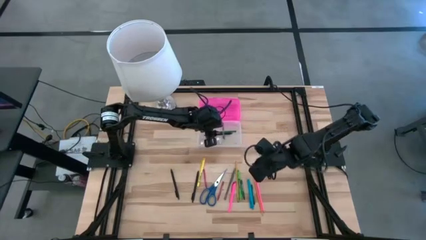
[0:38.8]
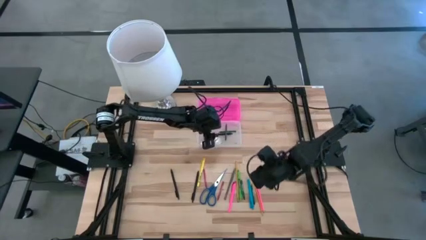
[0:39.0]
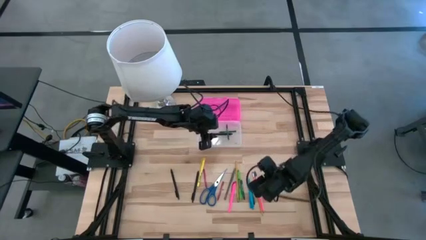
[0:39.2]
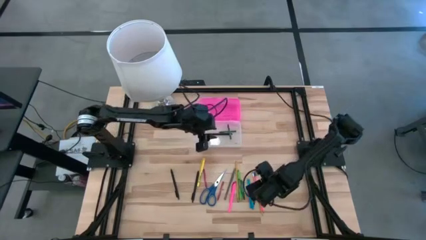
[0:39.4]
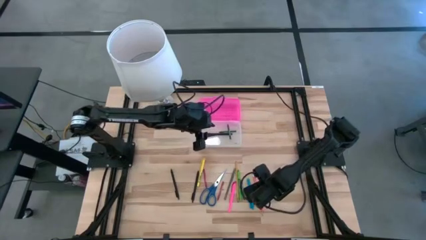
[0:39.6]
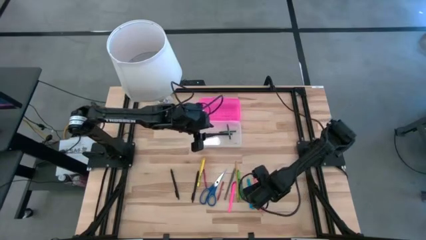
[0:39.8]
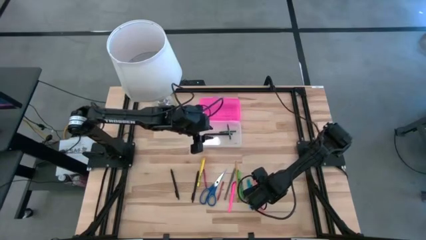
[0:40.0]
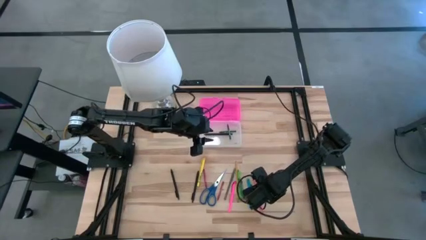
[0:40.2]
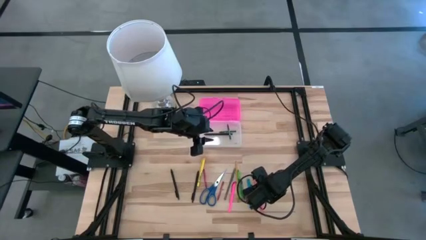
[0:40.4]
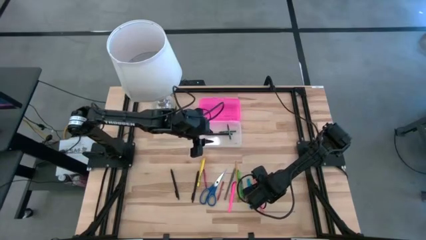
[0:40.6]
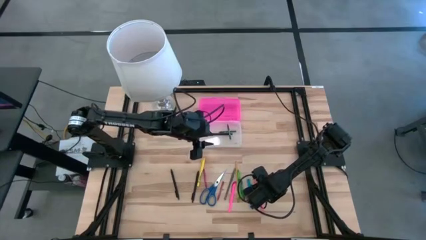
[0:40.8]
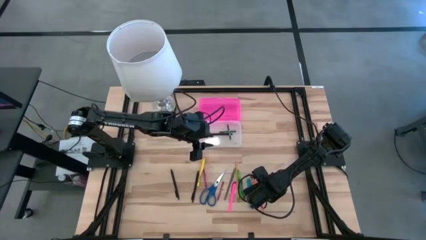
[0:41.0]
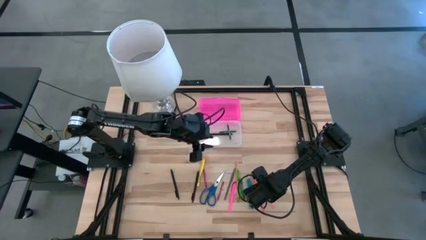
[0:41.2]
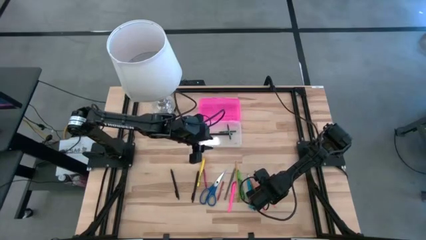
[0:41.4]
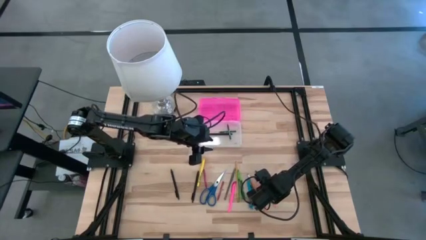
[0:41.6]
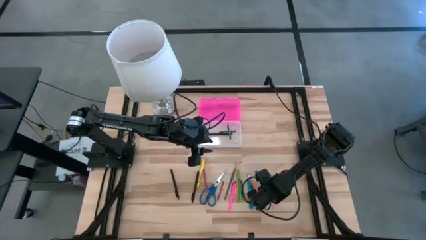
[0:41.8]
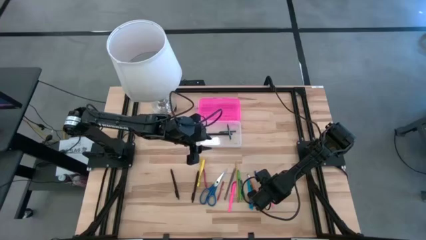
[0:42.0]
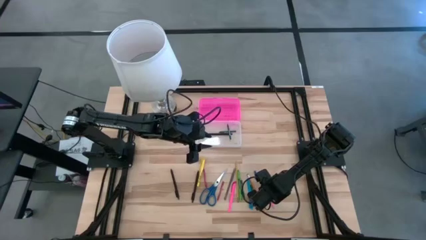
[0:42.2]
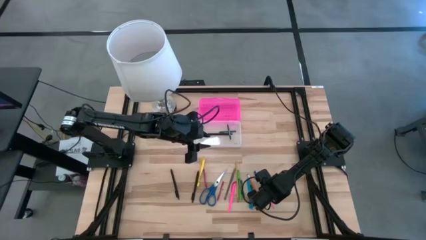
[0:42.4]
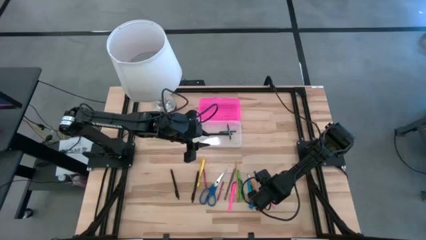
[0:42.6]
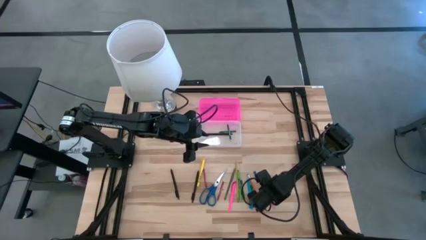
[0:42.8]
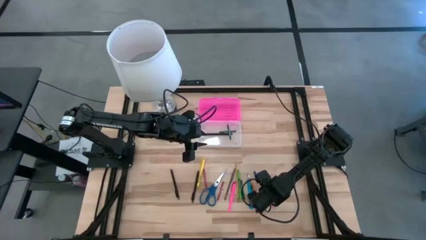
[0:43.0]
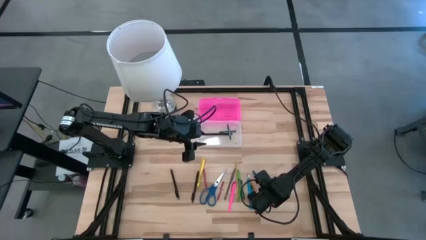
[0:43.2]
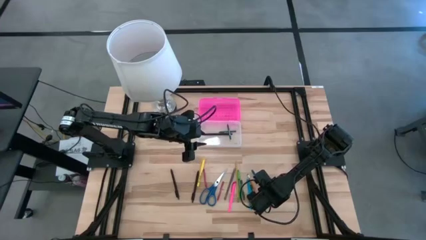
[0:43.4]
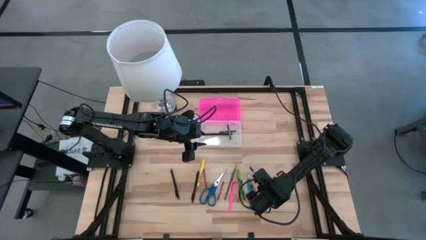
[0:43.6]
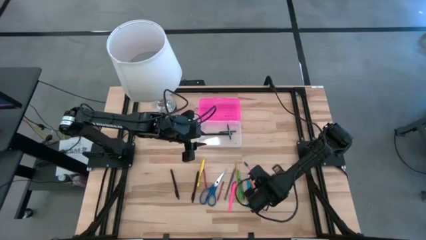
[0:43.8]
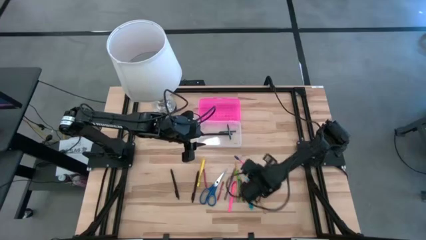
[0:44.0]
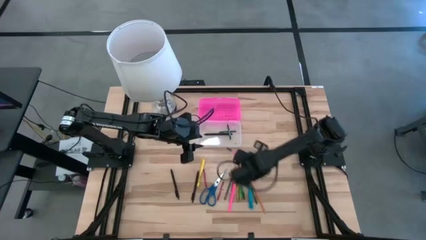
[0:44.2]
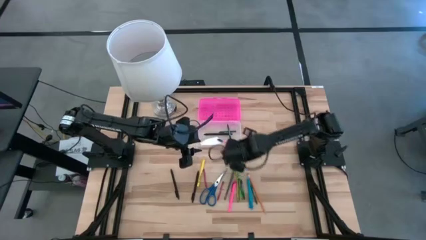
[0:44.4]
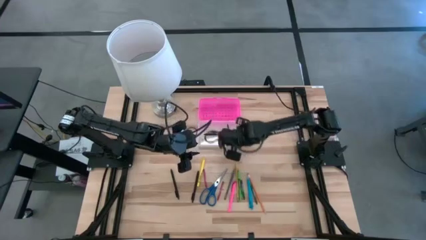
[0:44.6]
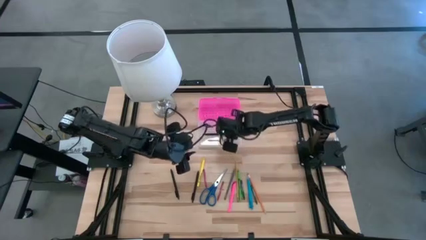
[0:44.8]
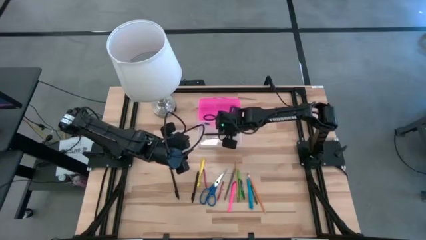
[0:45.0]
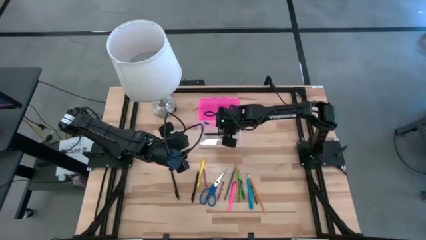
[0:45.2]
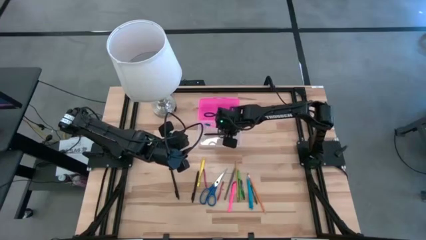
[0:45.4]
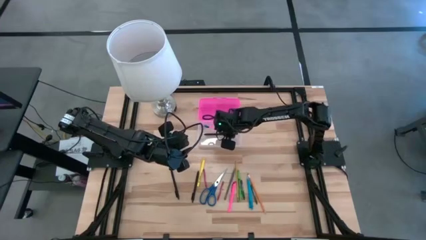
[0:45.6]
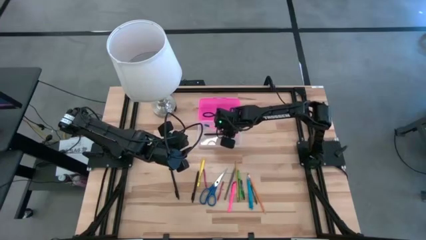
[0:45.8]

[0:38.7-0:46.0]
Task: Pick & place school supplies into a supply box
Put the pink pencil into the pink supply box

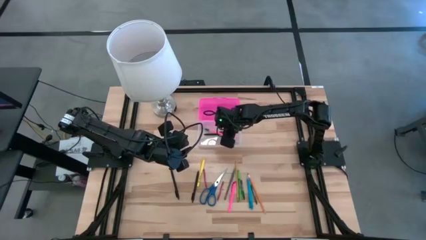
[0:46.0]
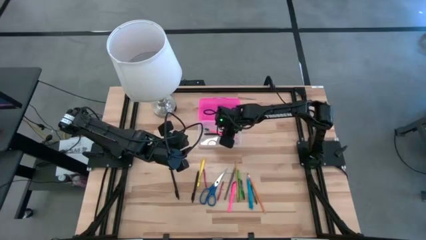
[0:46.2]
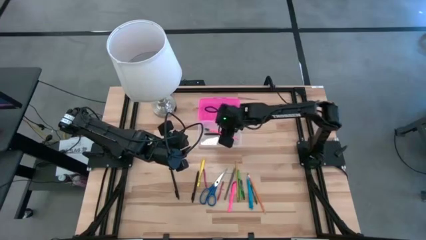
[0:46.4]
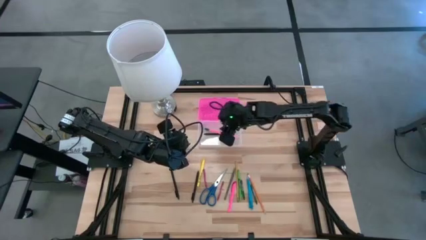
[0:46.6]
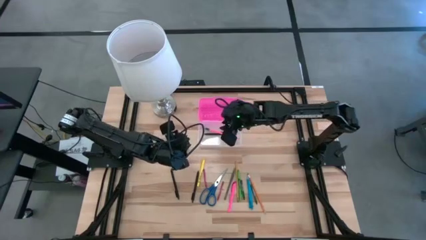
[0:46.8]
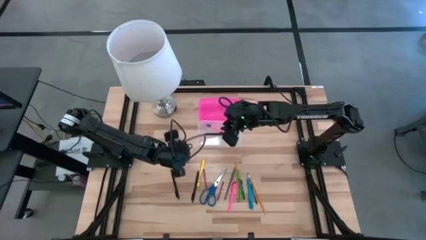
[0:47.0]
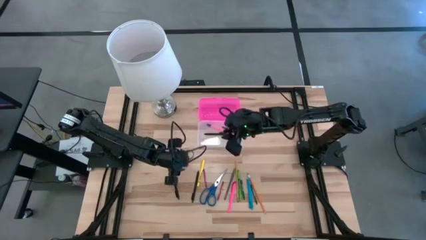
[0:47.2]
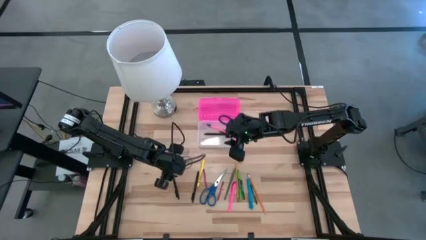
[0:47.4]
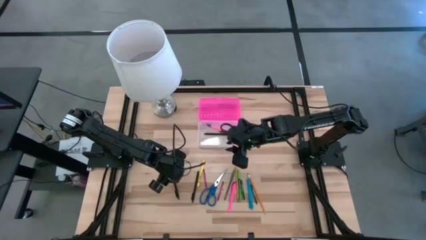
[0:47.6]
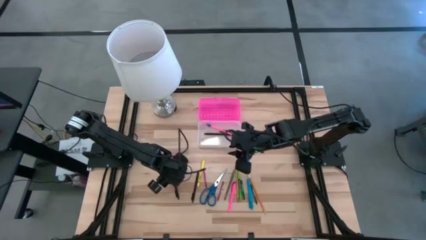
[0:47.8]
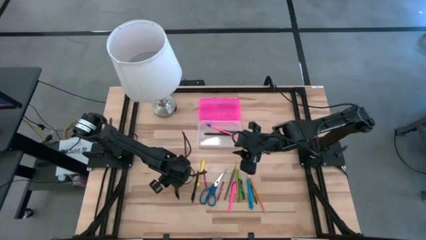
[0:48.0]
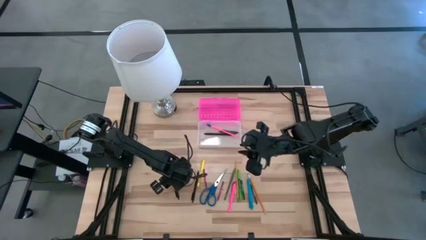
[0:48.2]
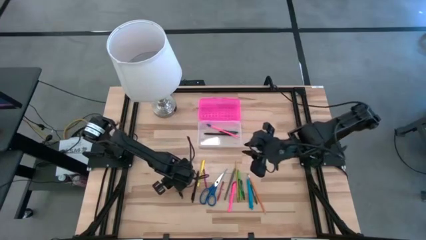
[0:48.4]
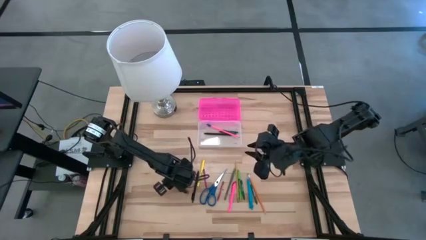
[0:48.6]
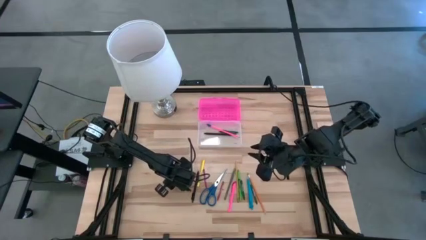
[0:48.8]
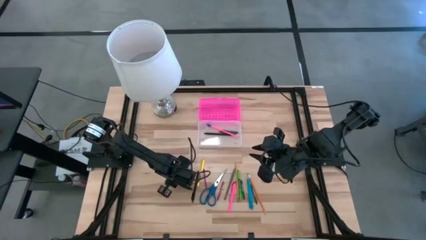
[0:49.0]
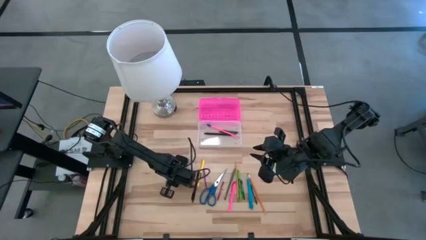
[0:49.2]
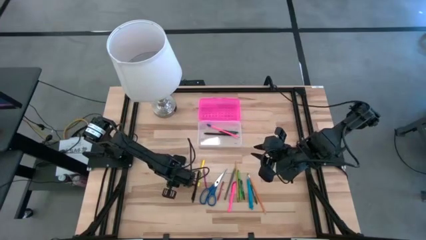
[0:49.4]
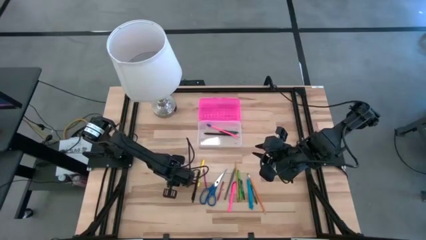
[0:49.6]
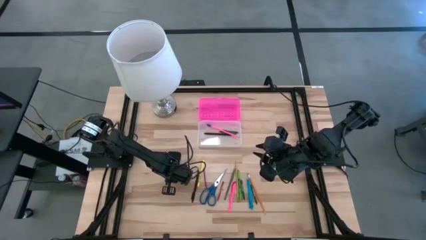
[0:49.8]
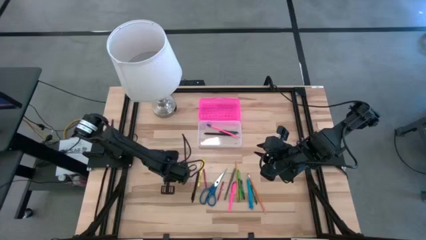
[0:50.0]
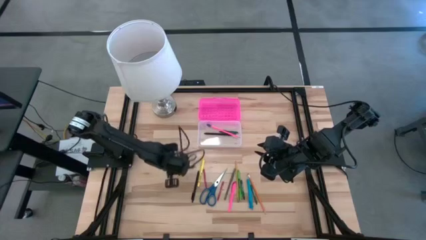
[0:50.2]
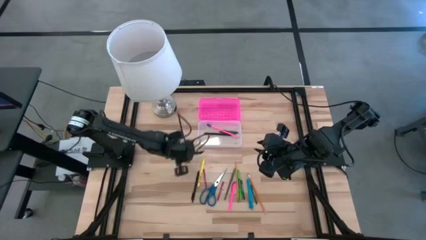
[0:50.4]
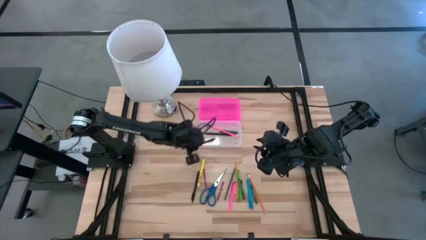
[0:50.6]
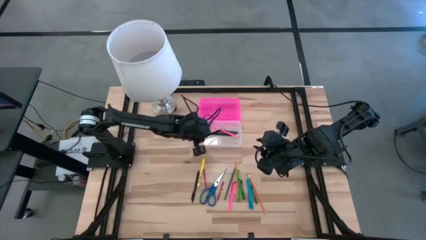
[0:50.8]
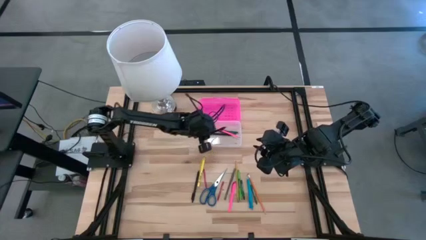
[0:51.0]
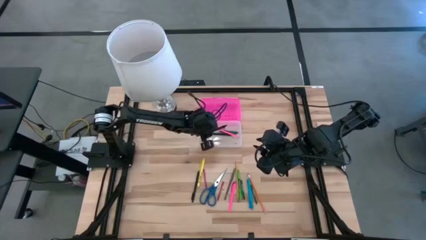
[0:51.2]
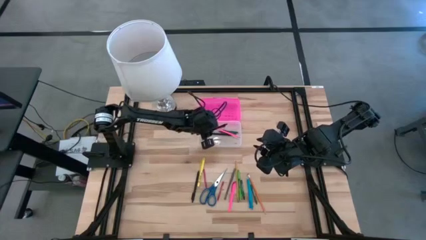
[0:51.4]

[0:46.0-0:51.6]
Put the left black pen into the pink supply box

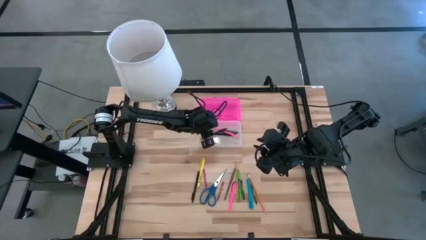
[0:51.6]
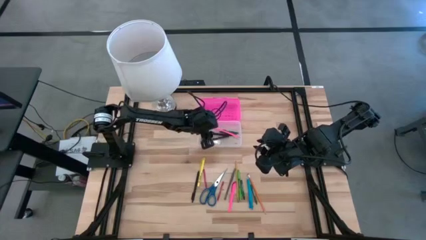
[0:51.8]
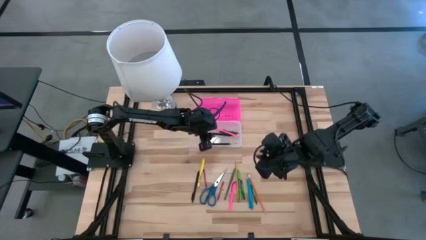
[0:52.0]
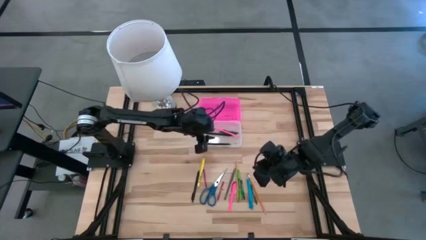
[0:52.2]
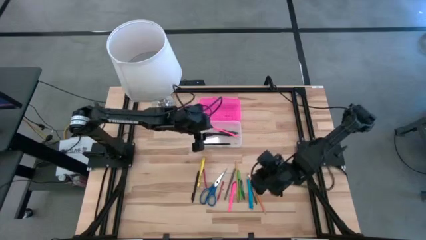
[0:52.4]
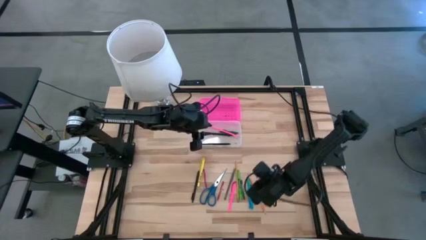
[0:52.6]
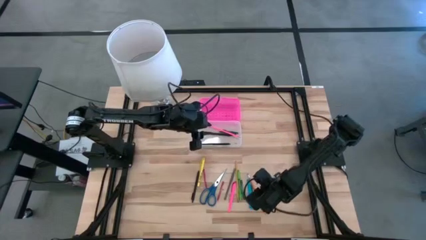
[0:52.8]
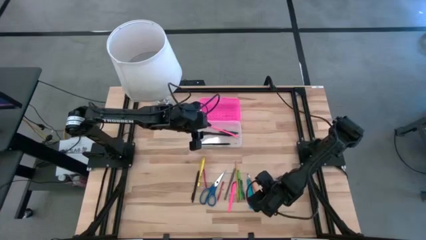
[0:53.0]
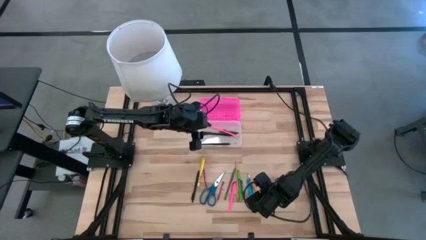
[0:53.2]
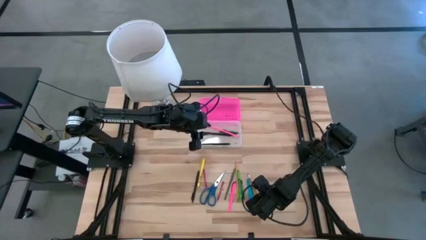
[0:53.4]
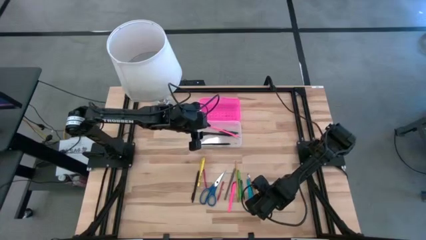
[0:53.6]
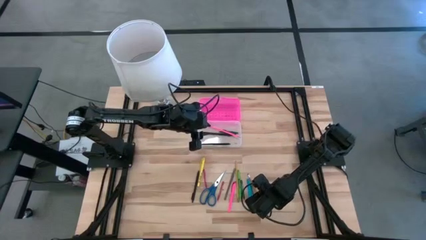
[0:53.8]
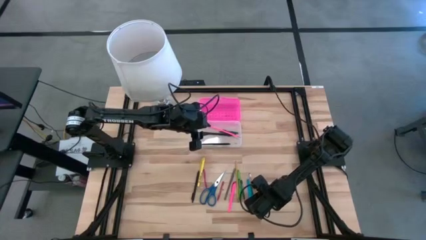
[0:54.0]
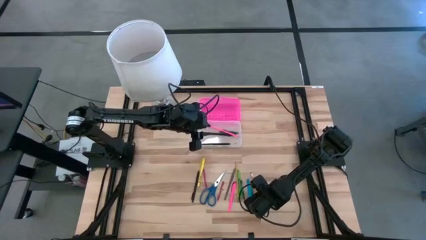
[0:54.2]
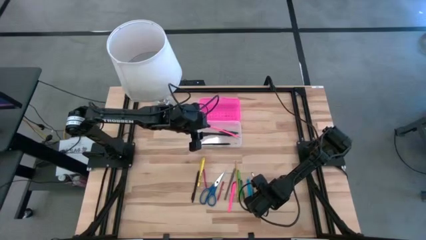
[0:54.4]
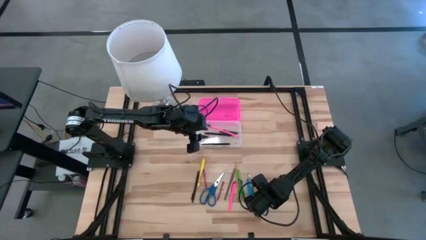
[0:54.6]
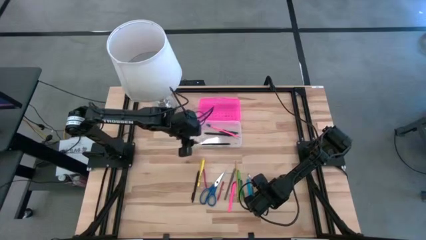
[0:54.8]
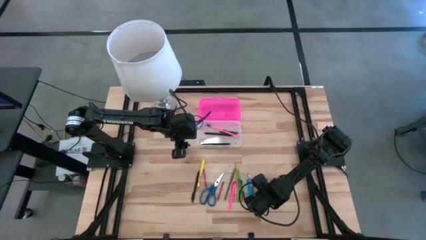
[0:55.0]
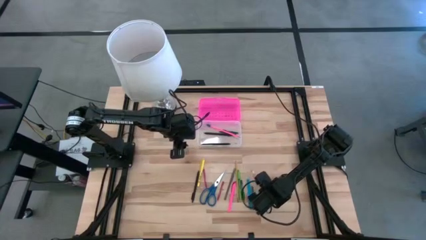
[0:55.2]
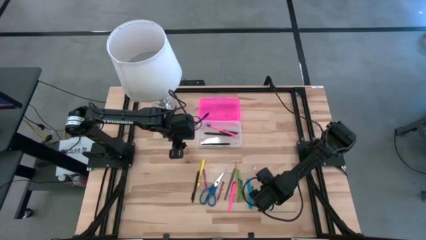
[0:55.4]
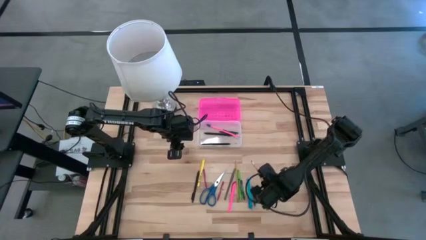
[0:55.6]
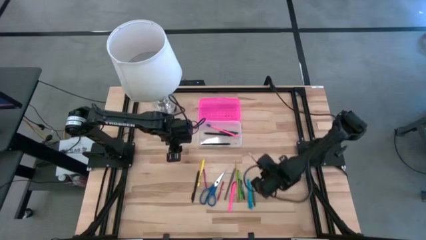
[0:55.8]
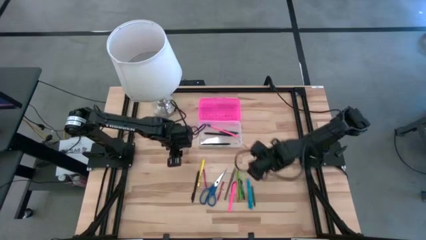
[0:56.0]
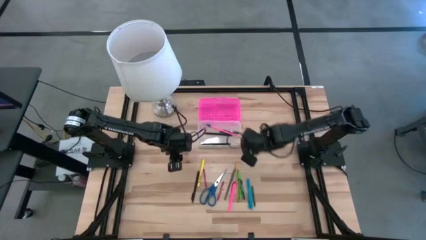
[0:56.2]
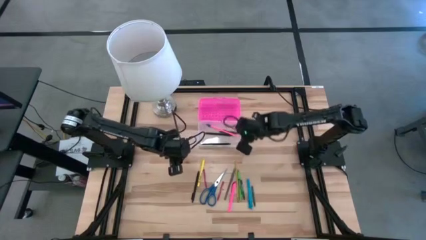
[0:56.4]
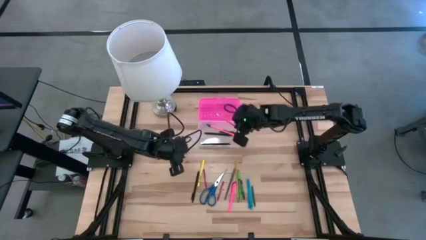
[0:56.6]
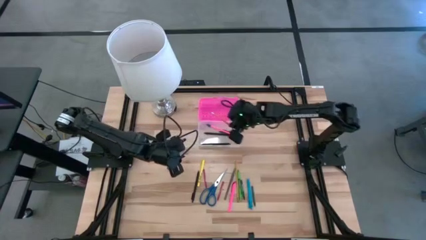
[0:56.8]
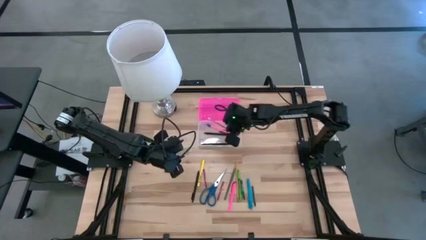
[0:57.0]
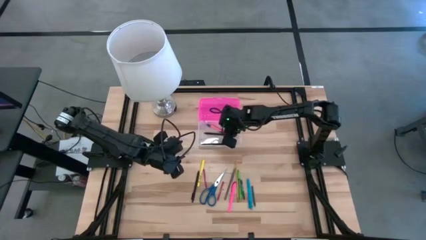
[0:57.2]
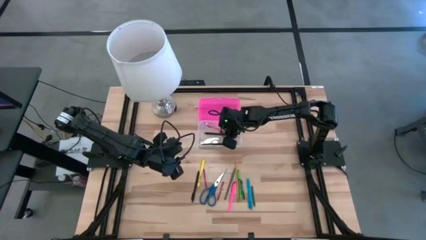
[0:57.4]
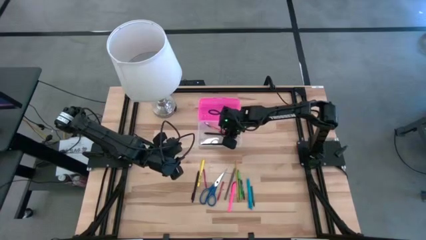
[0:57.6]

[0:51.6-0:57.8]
Put the orange pencil into the pink supply box
